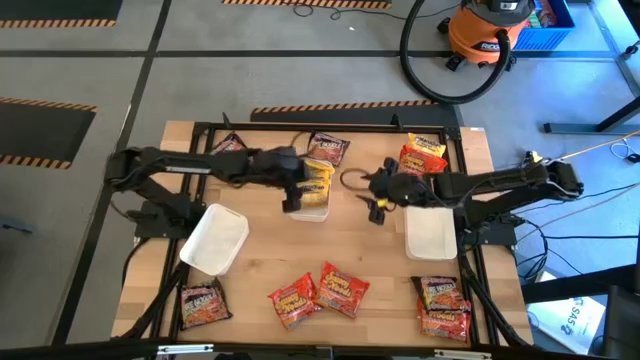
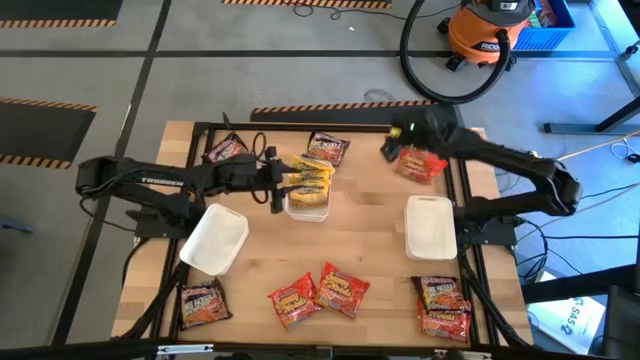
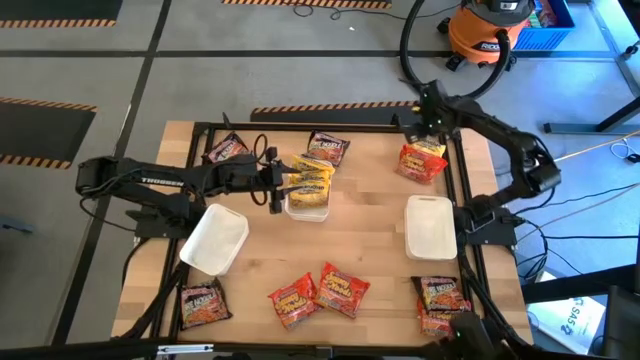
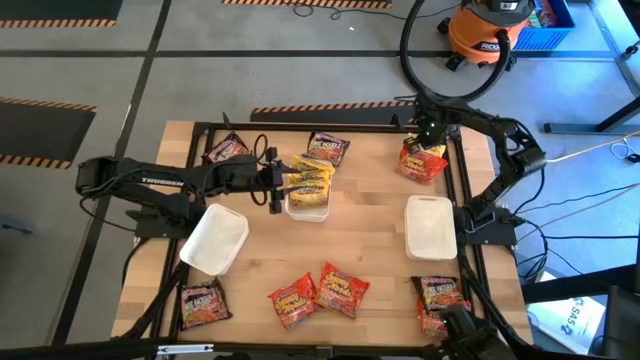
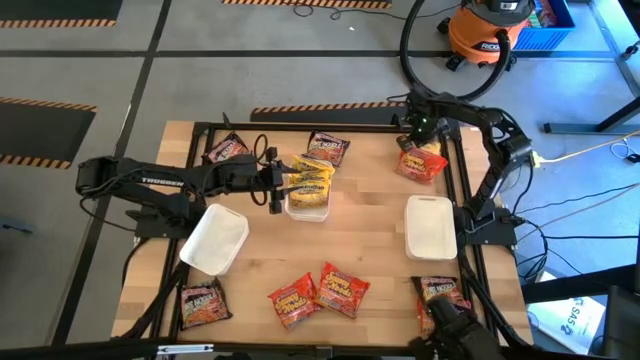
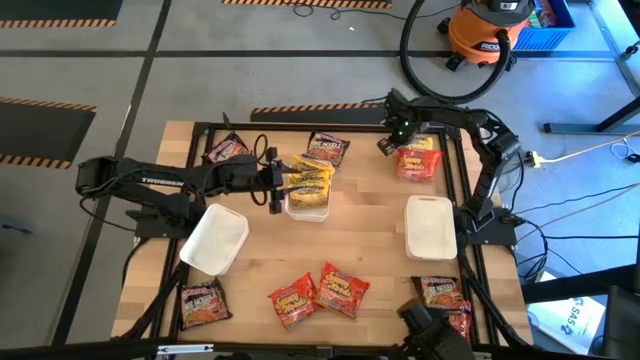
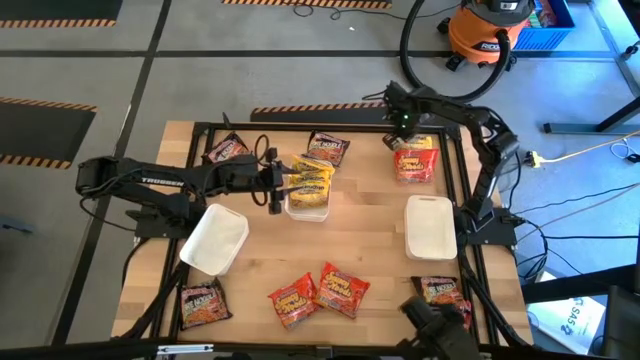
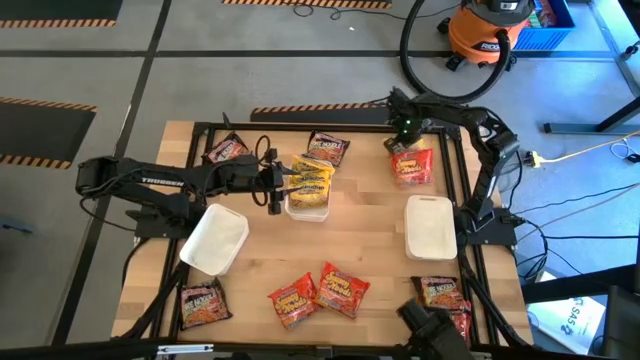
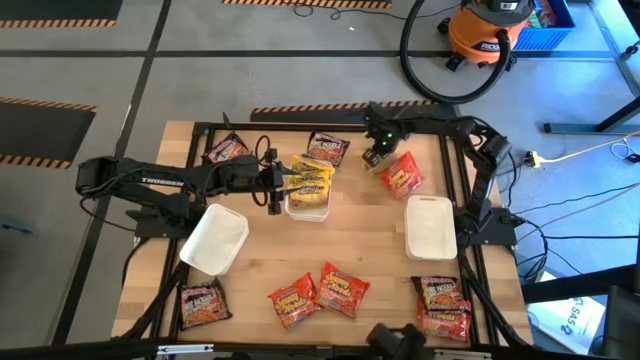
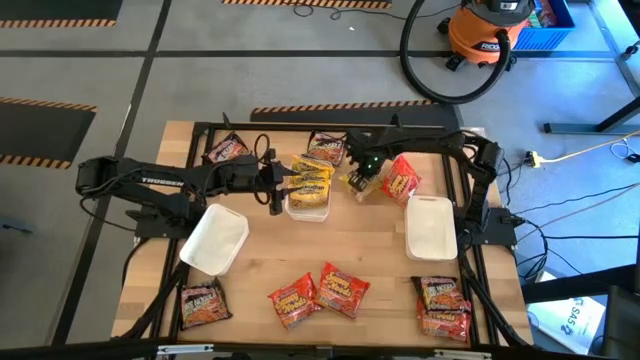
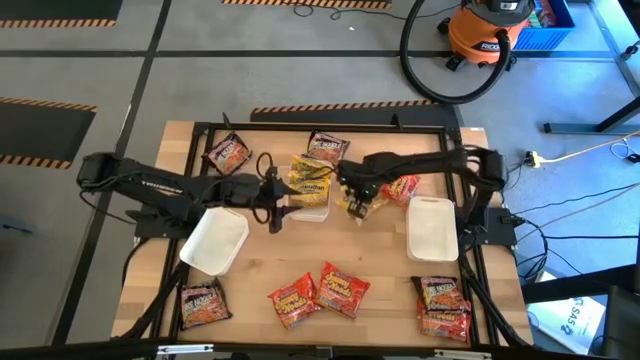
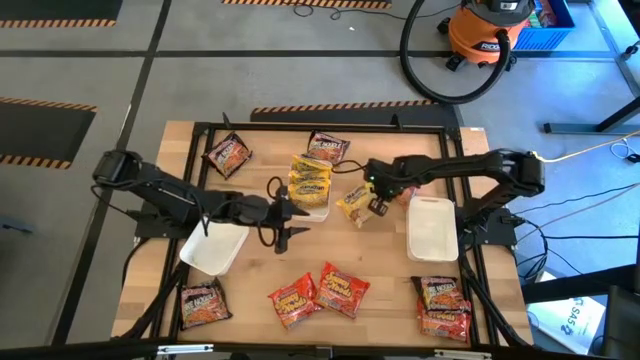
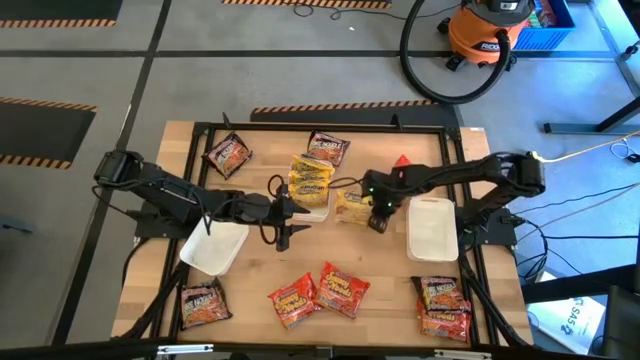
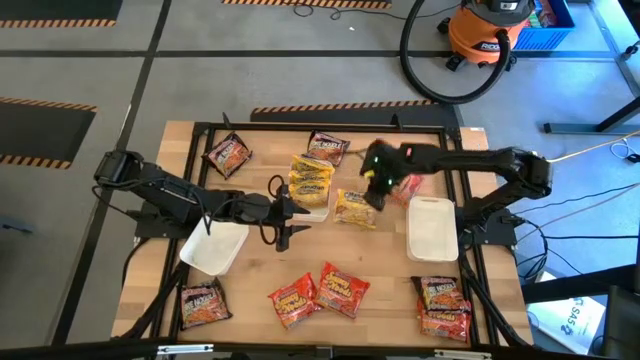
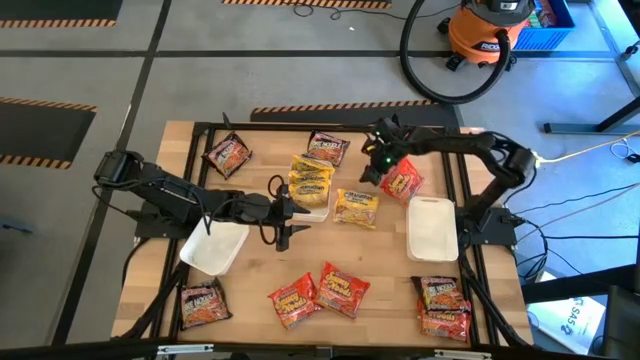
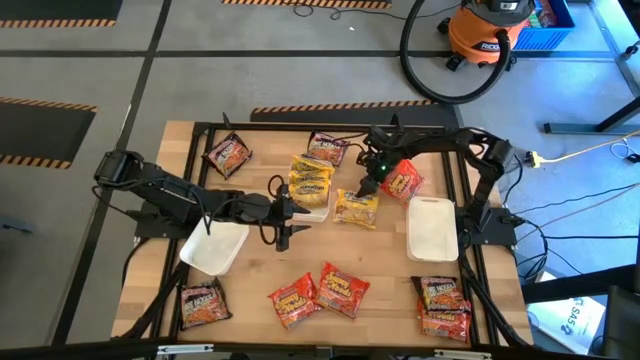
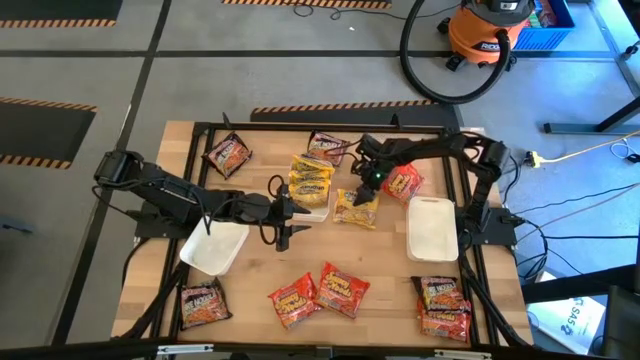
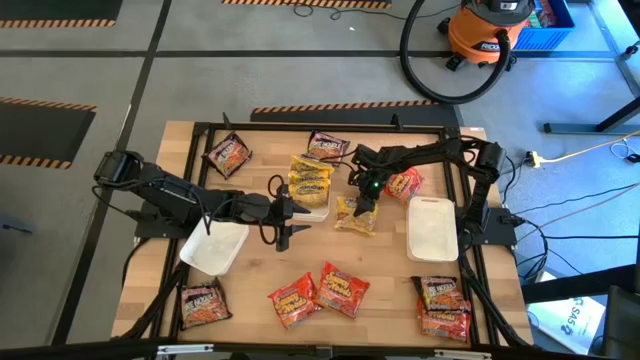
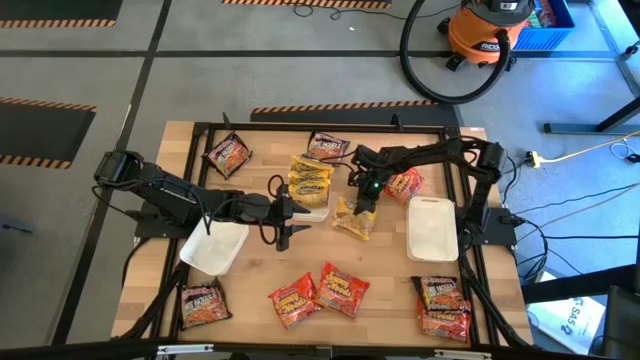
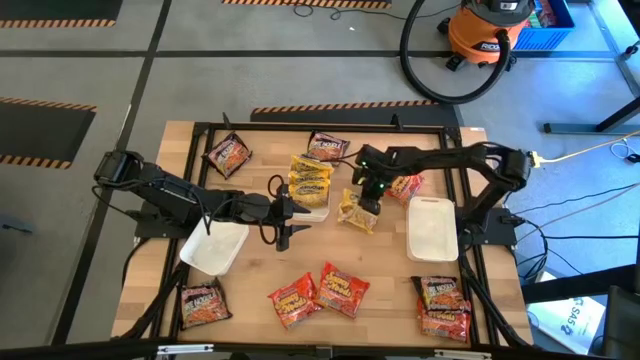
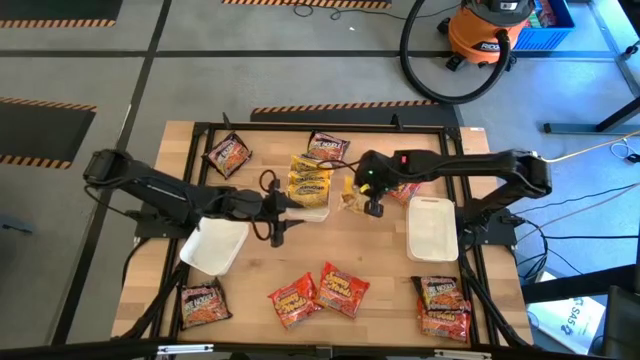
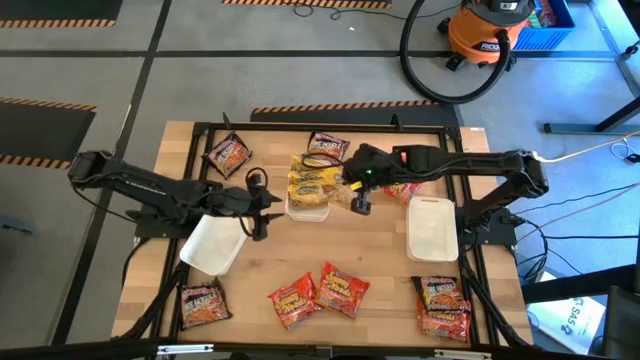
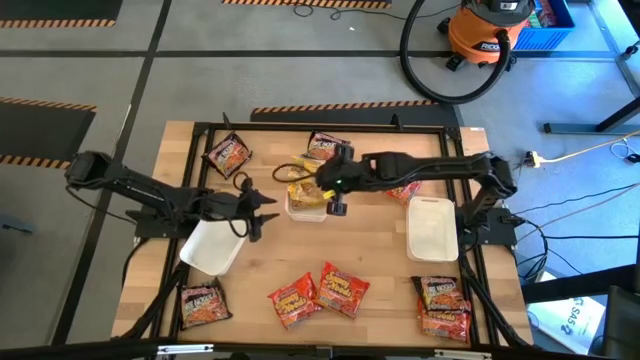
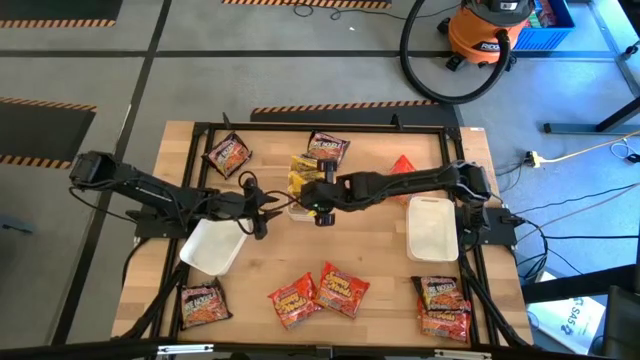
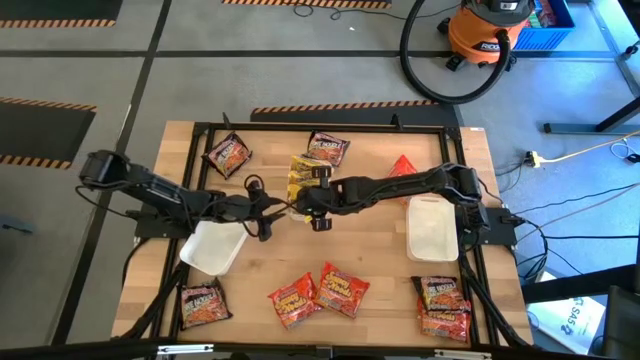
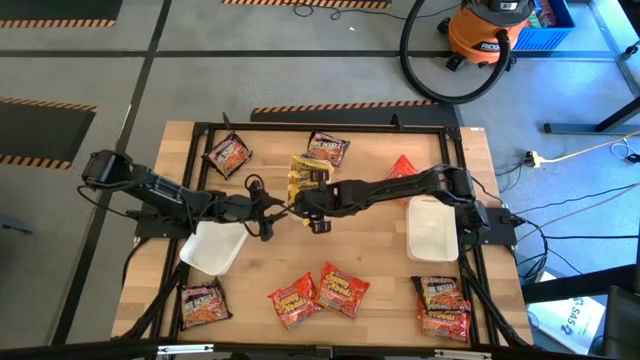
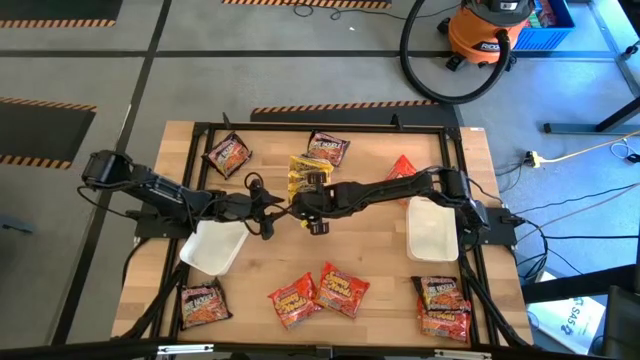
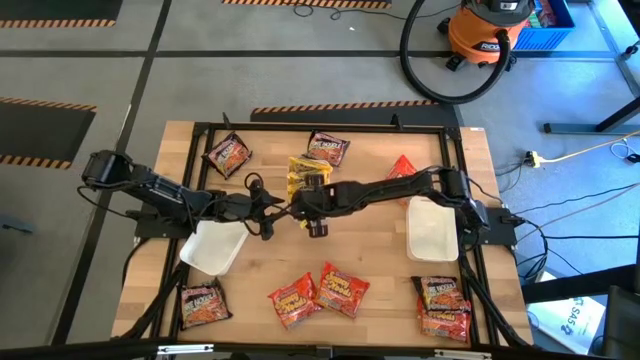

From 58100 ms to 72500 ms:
Task: Sort Maruchan noodles
Put the yellow noodle pack into the center white bin

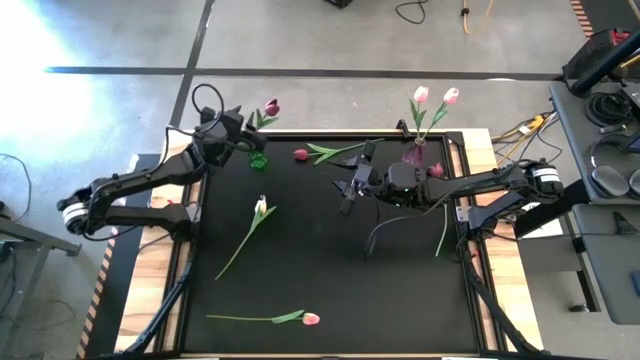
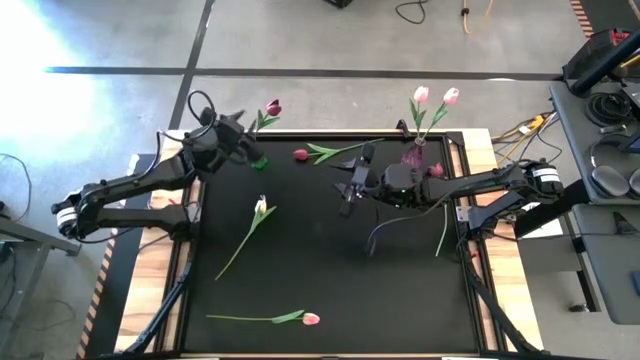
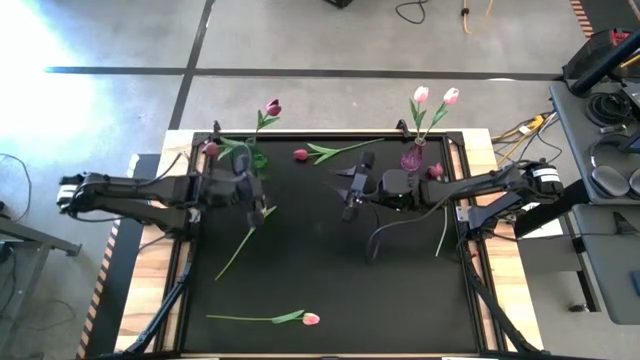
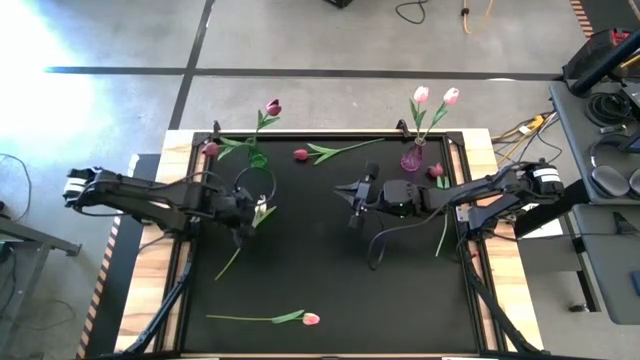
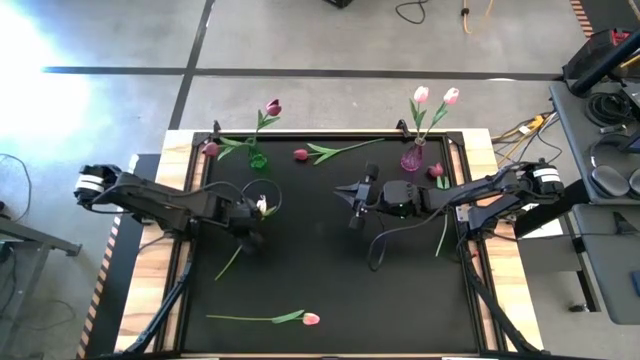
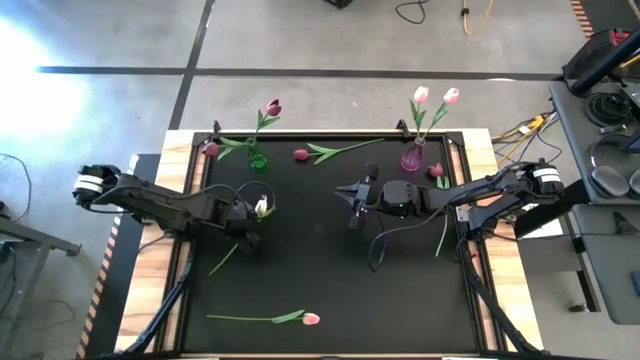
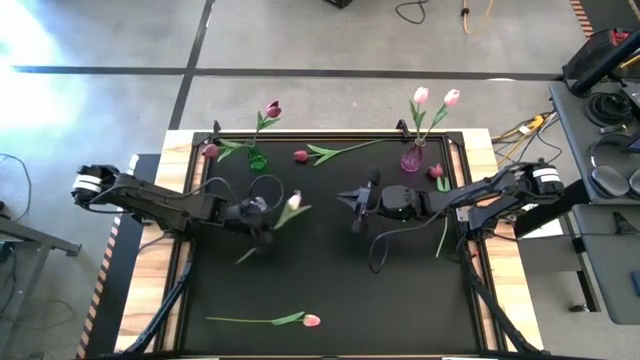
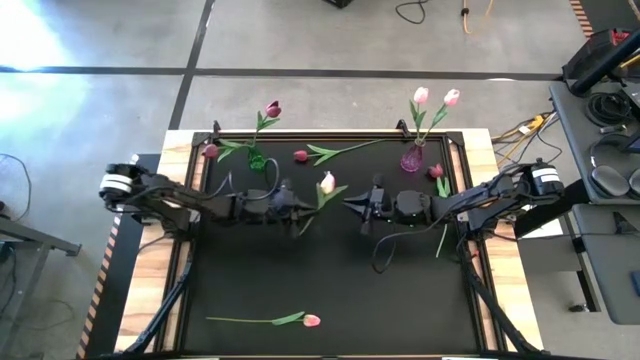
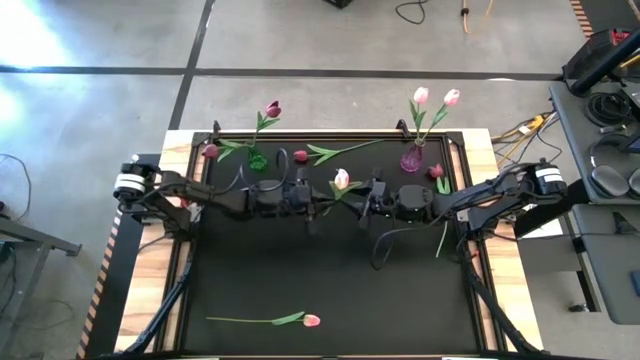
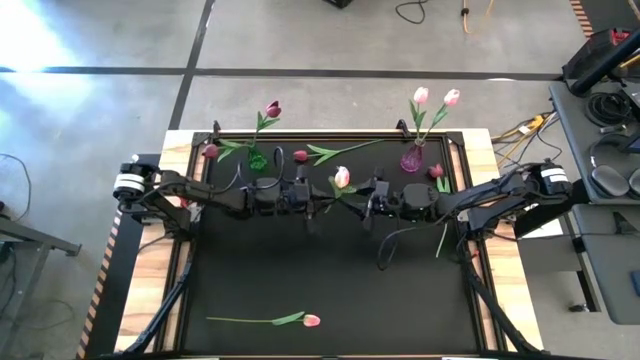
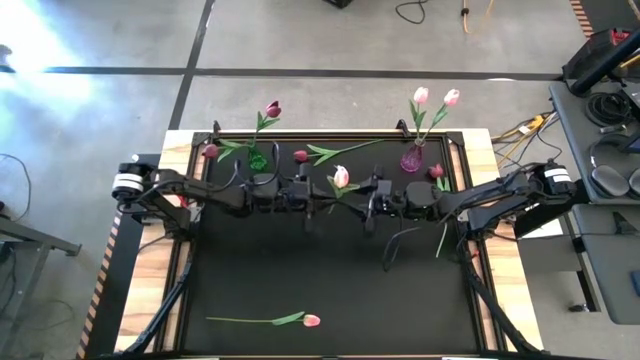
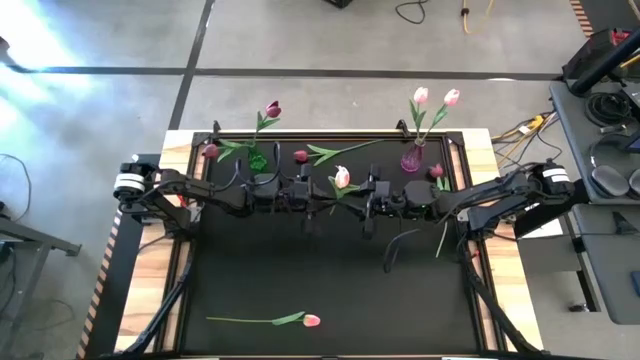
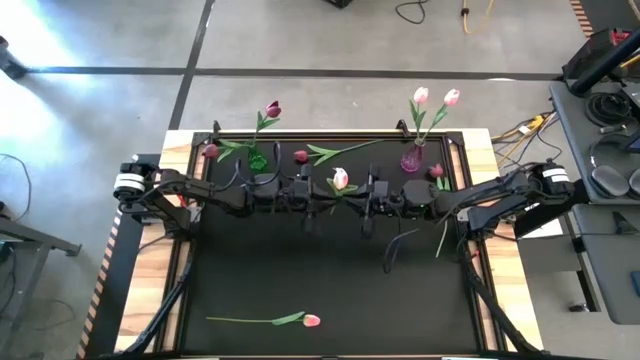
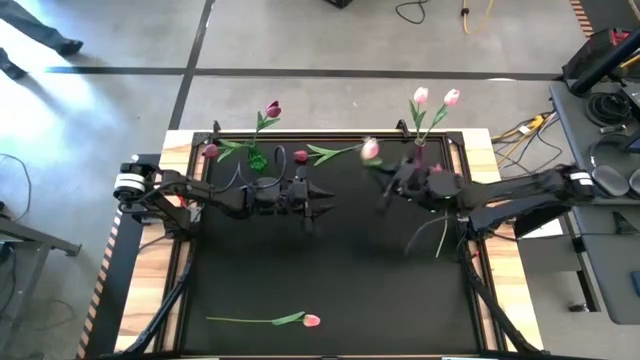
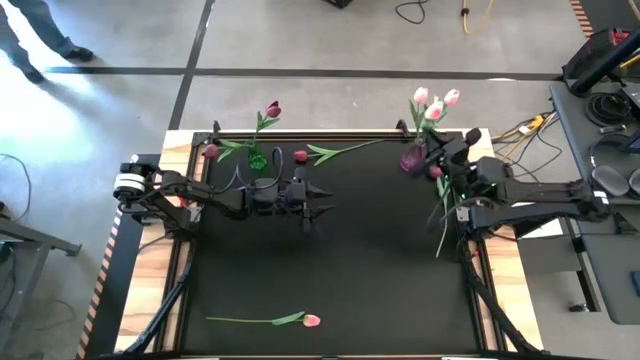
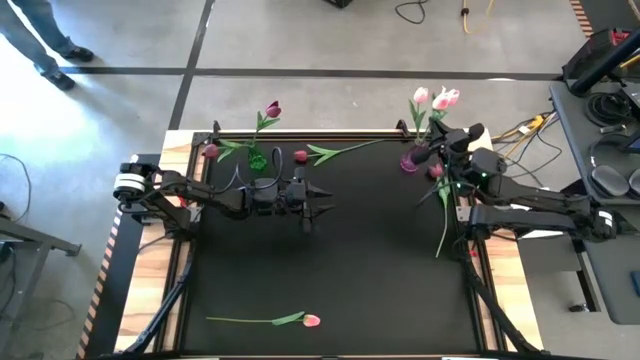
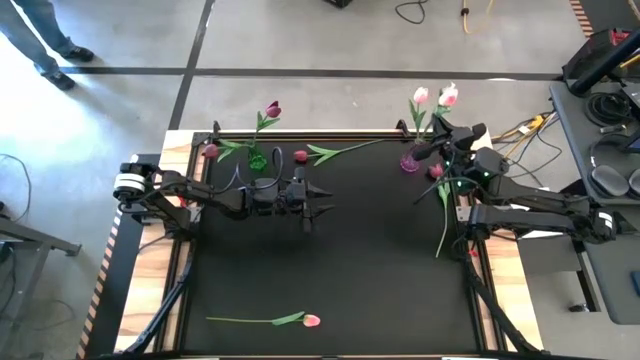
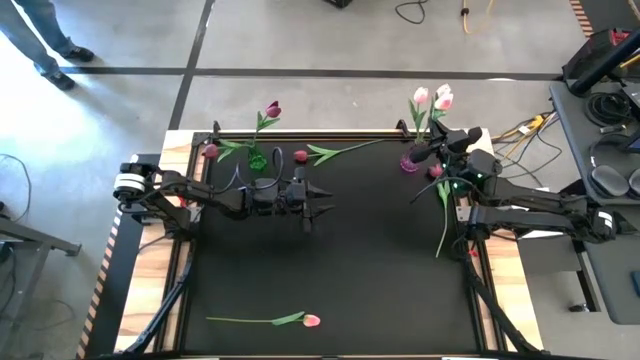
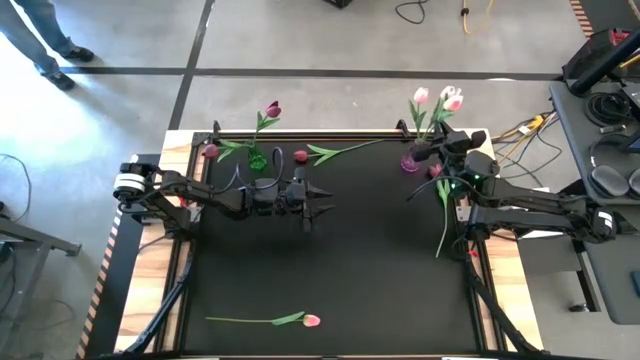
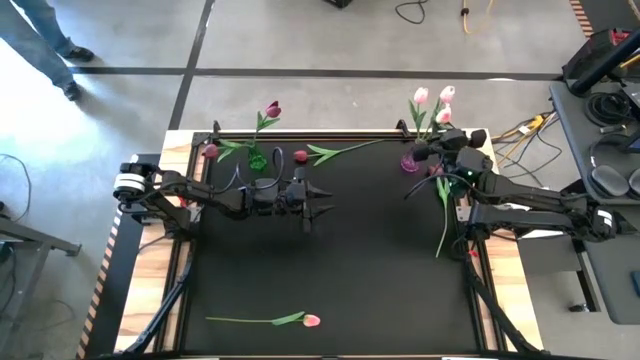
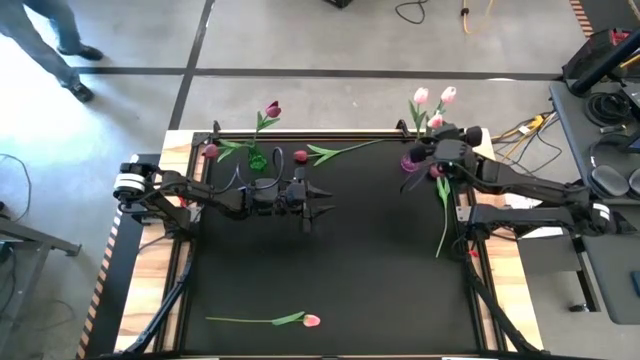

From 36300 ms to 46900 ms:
Task: Sort flowers into vase by color
Put the pink flower into the violet vase
